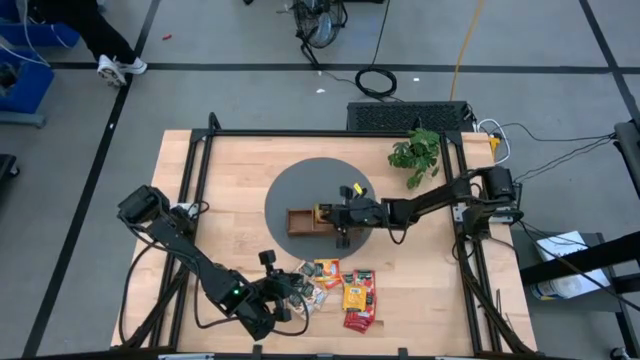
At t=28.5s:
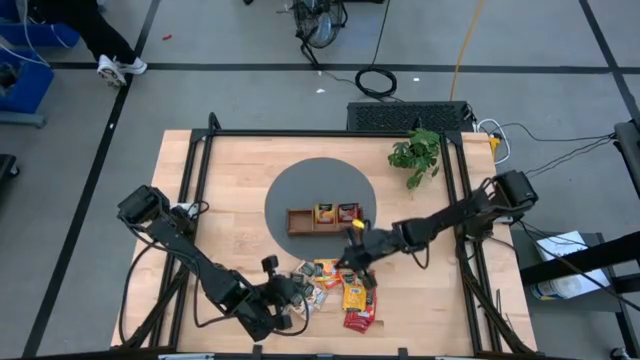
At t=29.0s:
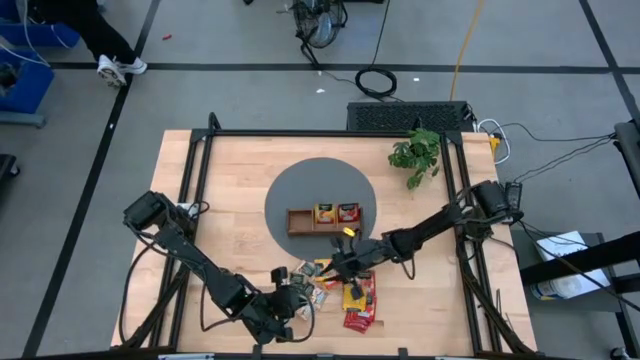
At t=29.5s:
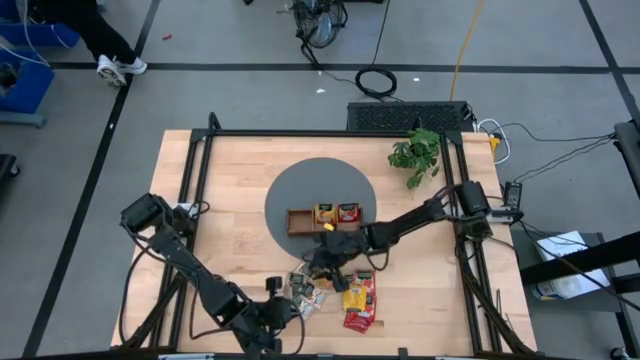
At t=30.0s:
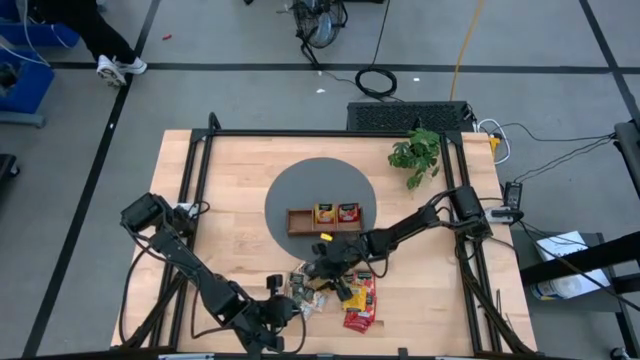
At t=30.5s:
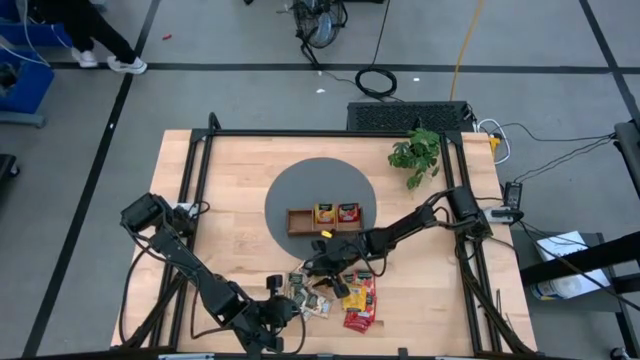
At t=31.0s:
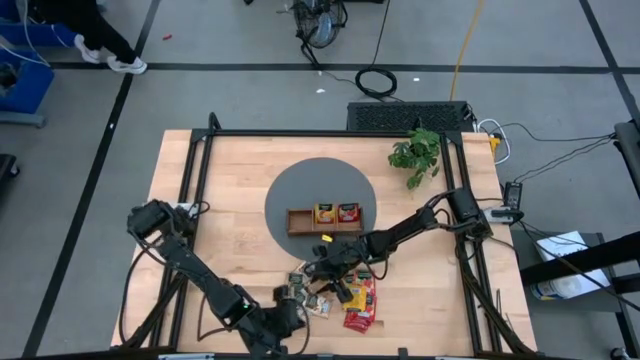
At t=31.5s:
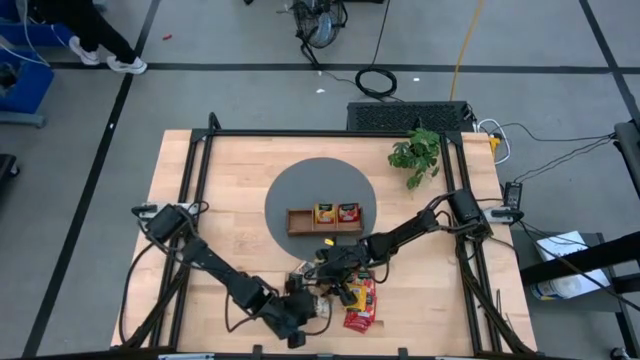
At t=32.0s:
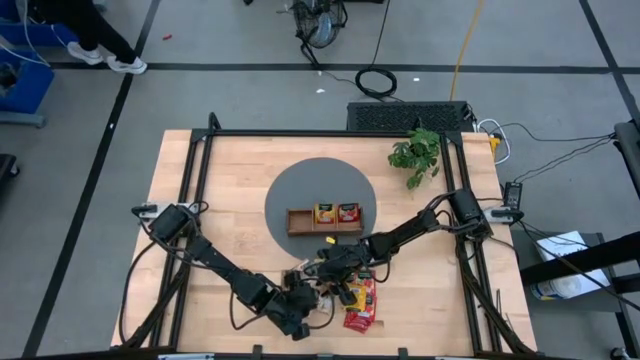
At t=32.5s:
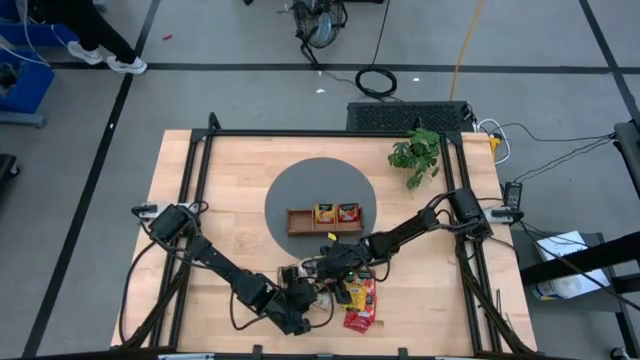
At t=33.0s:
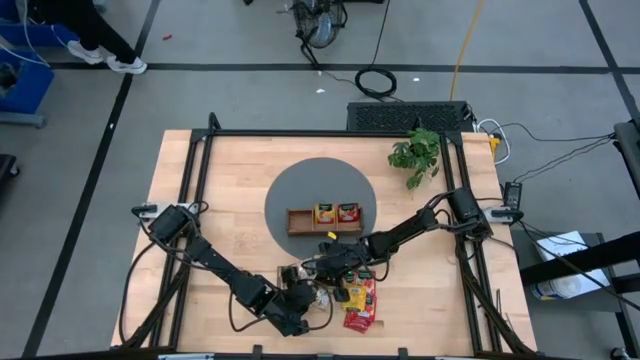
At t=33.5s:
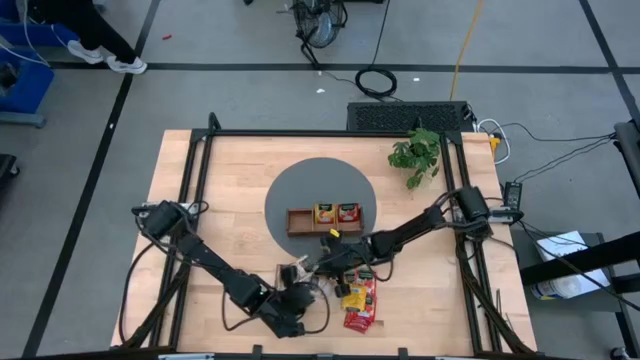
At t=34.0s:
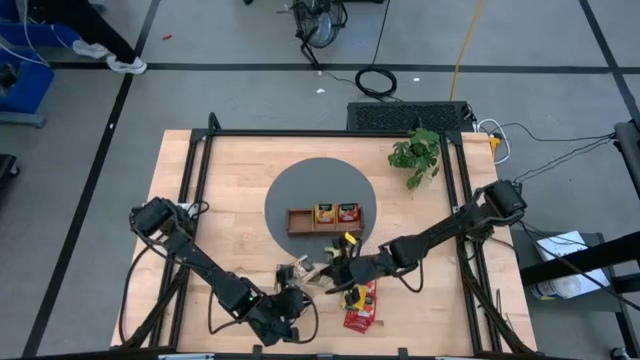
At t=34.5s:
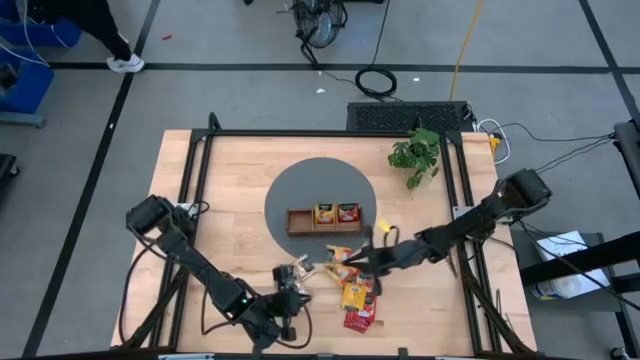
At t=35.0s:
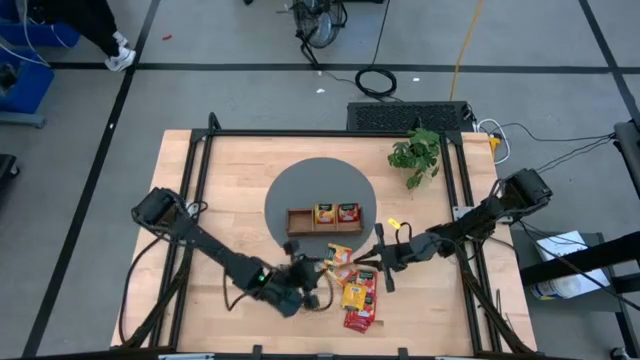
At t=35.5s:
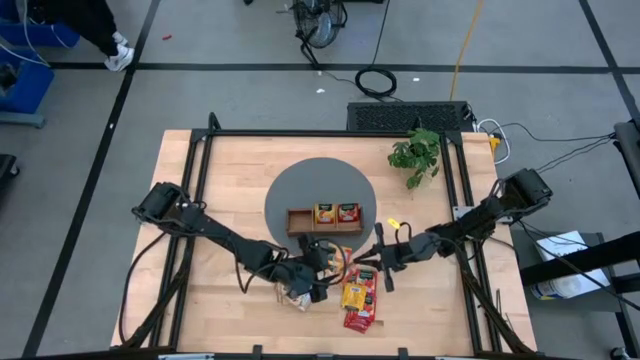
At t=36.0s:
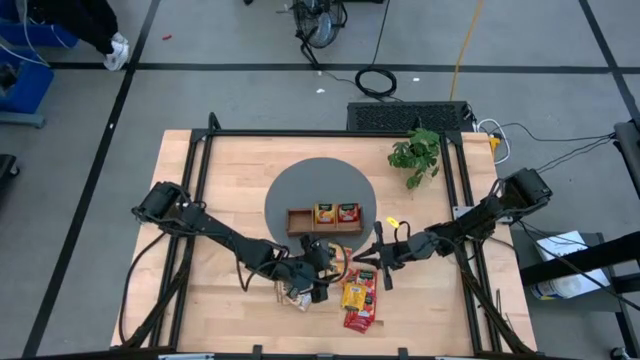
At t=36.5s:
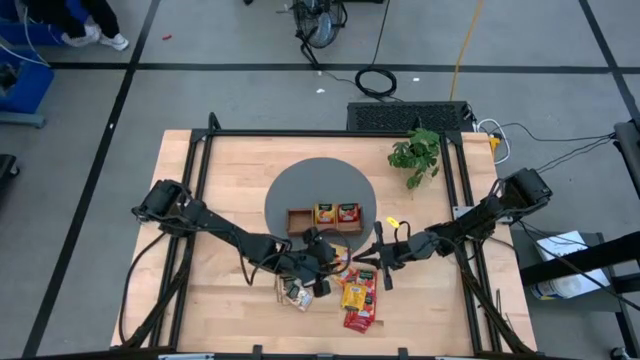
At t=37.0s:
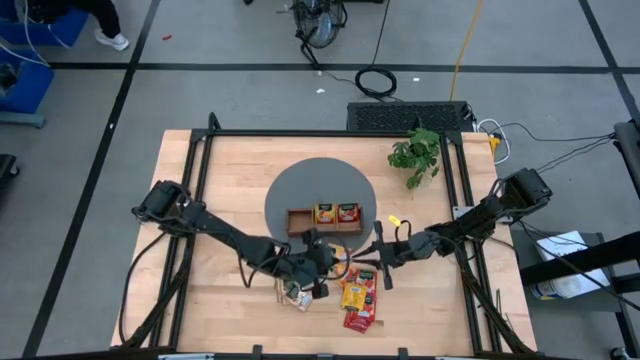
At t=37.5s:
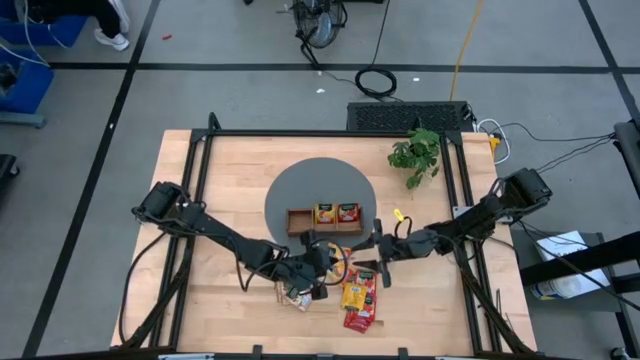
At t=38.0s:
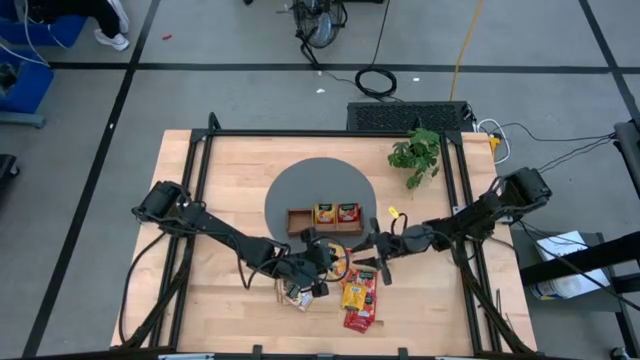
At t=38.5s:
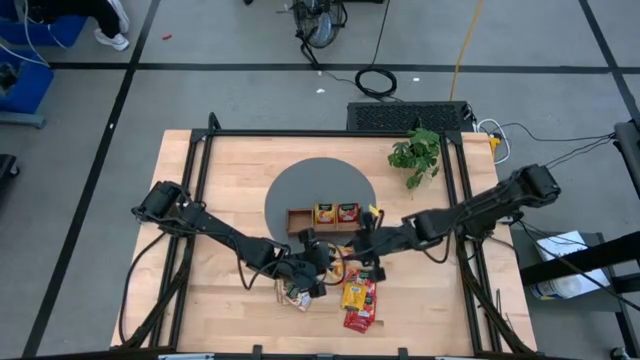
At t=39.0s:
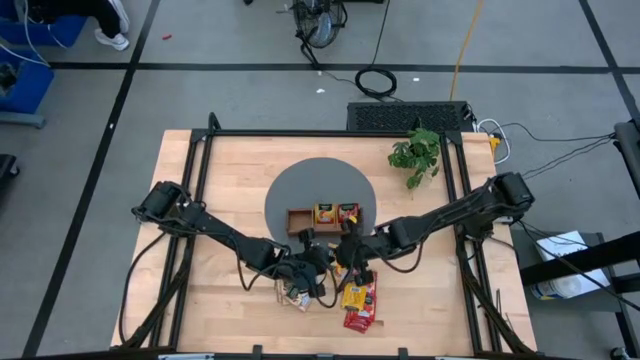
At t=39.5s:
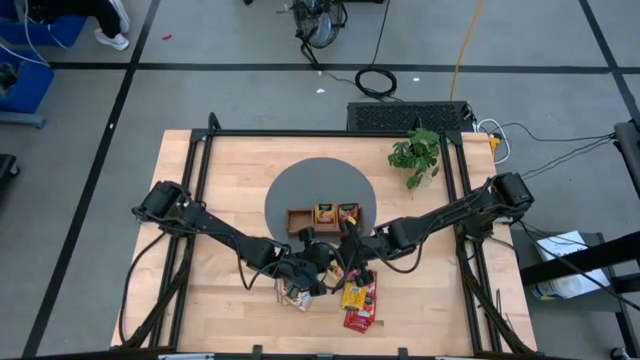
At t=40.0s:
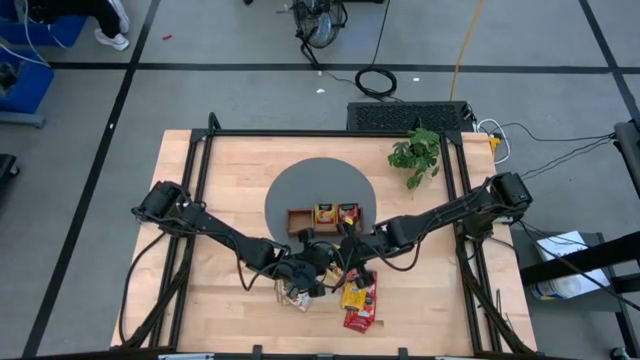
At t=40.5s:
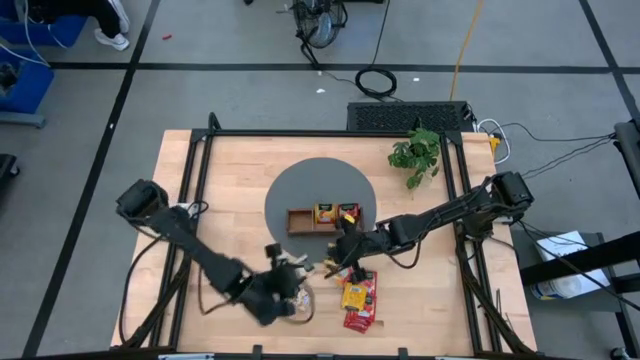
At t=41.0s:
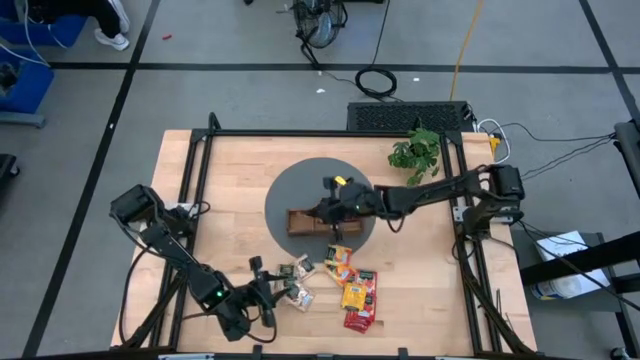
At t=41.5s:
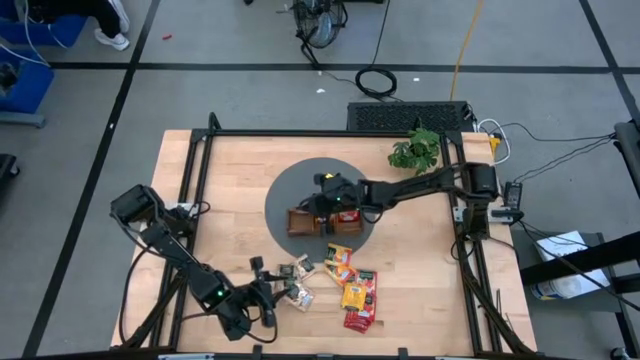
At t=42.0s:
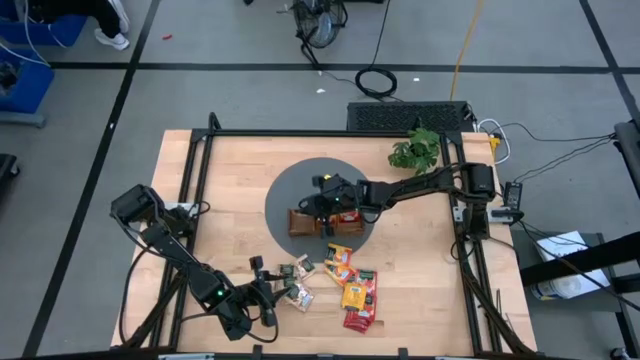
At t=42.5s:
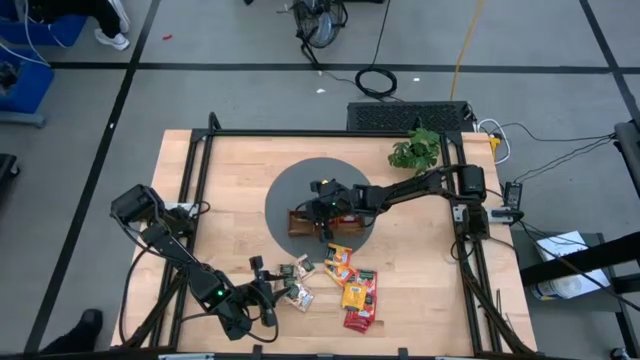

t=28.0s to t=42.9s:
Task: Pick & Place Tea
Put the brown tea bag into the left slot of the wooden organizer

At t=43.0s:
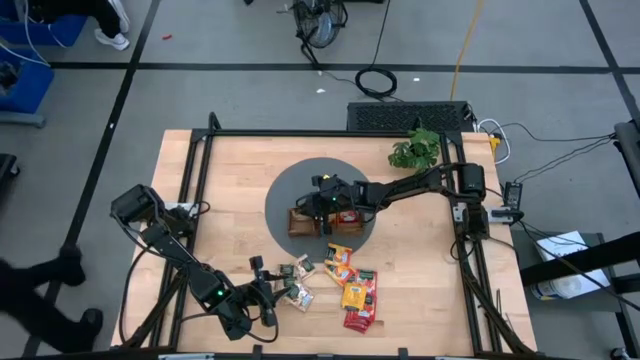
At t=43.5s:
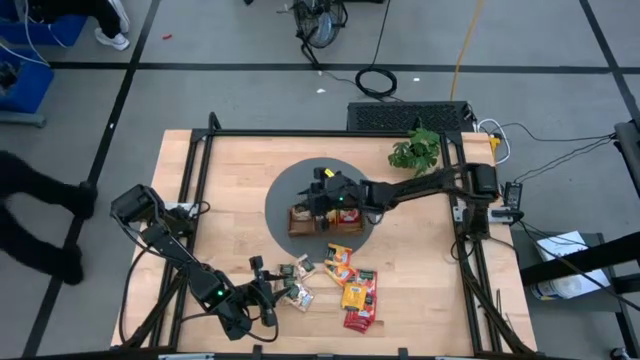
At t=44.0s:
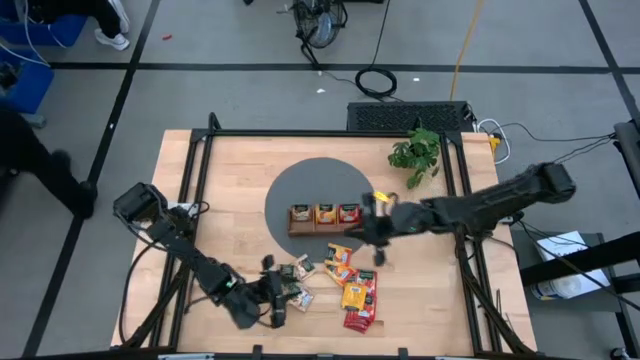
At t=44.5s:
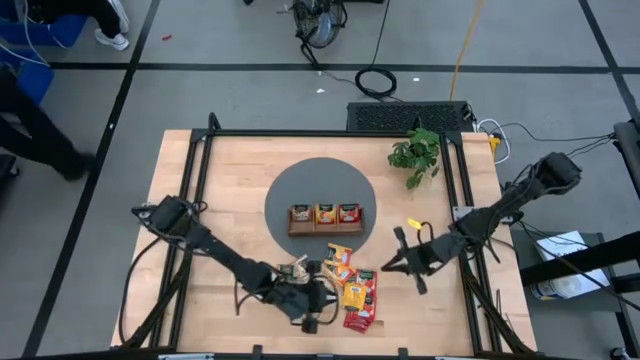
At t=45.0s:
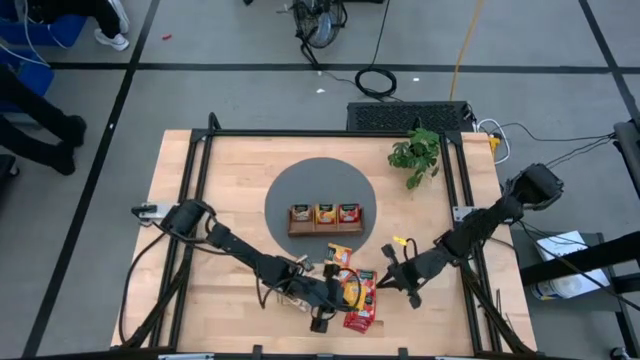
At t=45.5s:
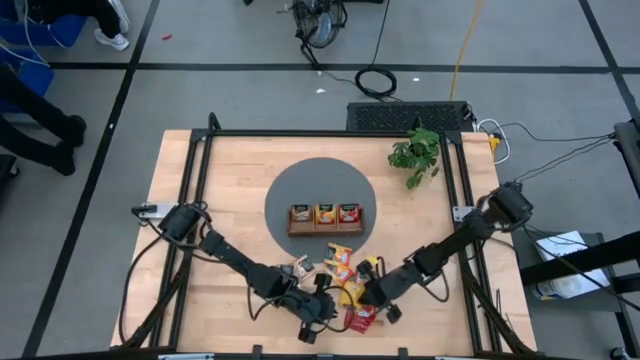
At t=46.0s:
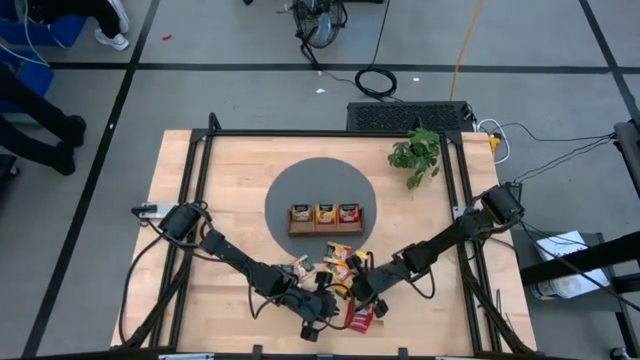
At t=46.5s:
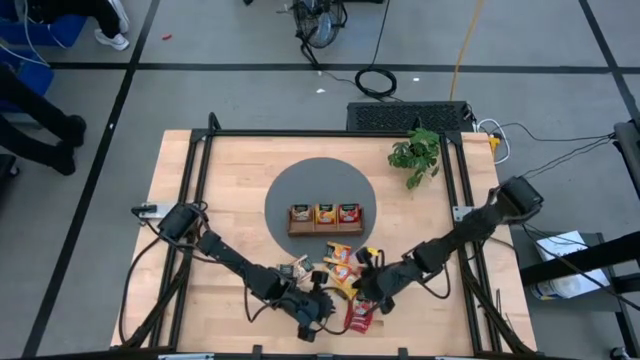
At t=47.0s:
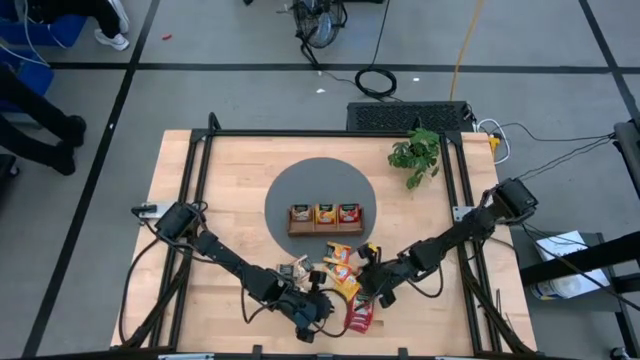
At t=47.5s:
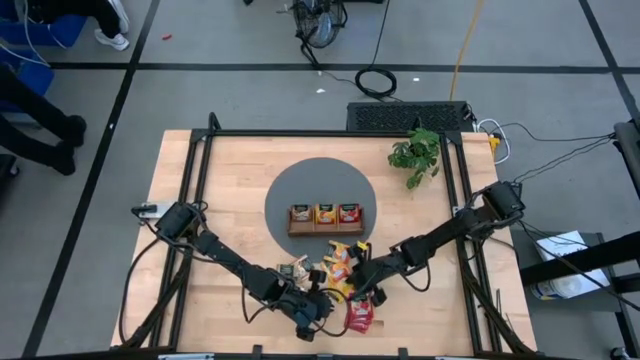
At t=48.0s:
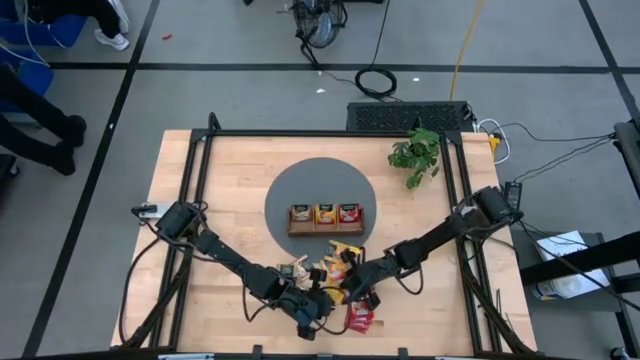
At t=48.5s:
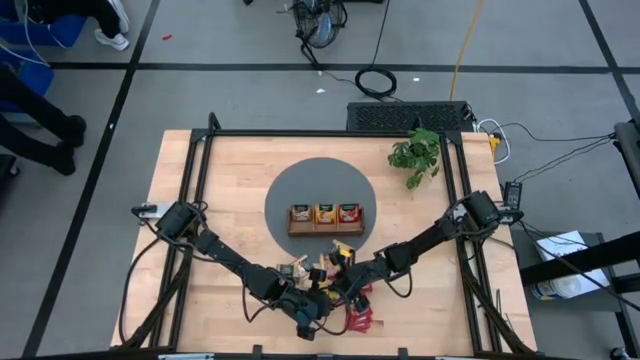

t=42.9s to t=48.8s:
Adjust the orange tea bag on the table

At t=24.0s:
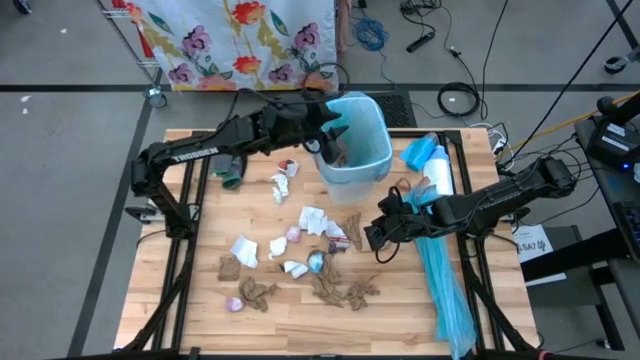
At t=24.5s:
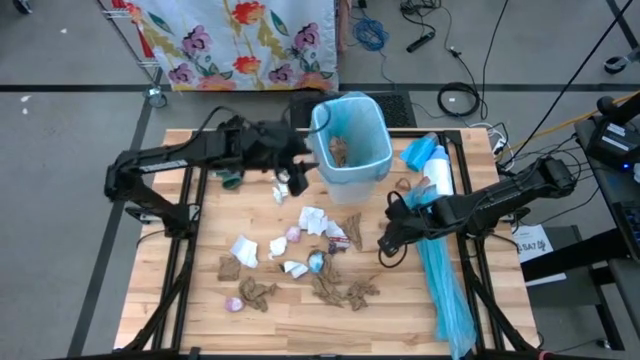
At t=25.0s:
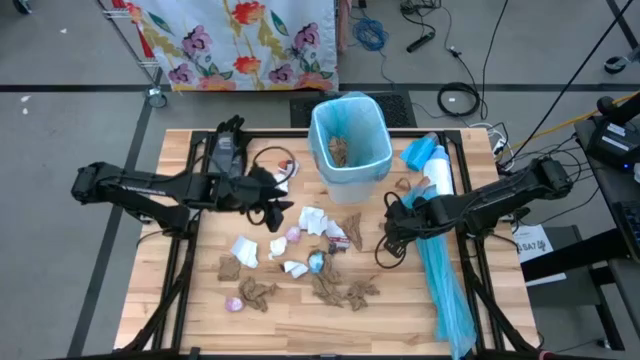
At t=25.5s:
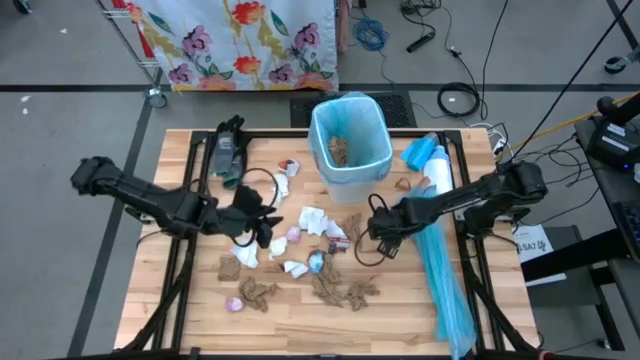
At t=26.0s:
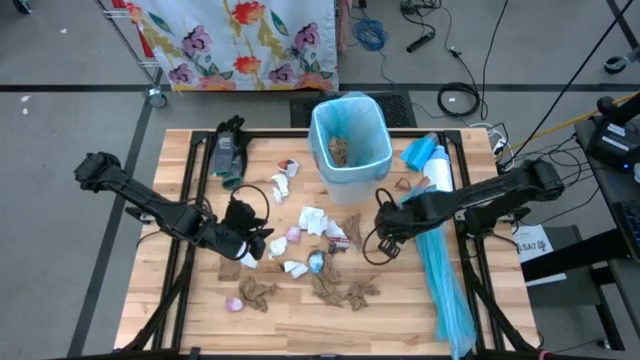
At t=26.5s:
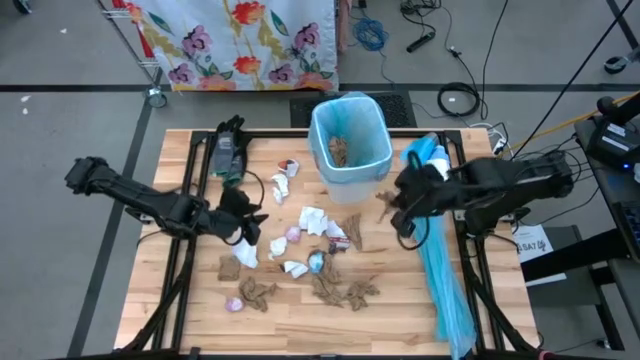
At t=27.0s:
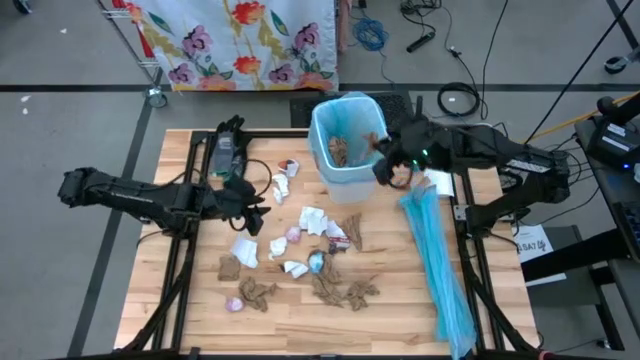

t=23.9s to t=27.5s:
Task: place trash/remove bag and relplace
Put the brown napkin into the trash bin
